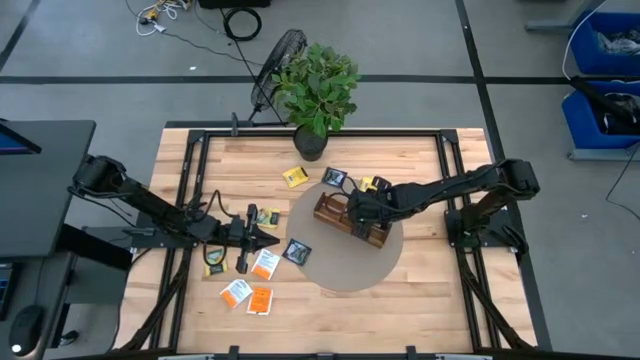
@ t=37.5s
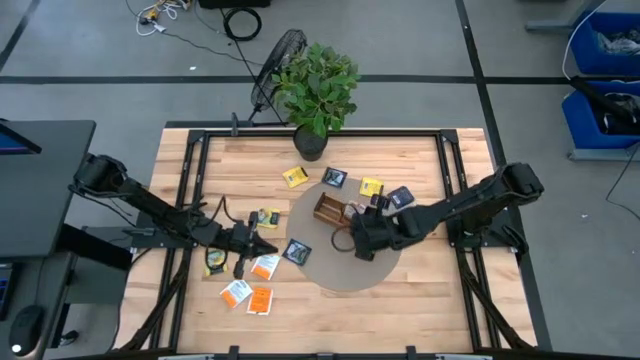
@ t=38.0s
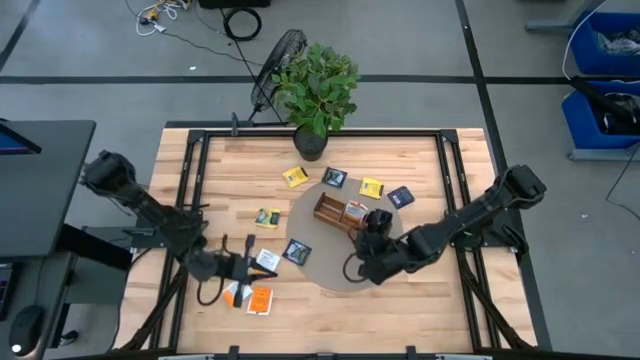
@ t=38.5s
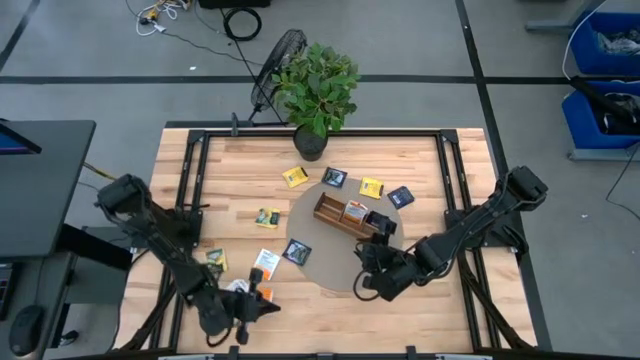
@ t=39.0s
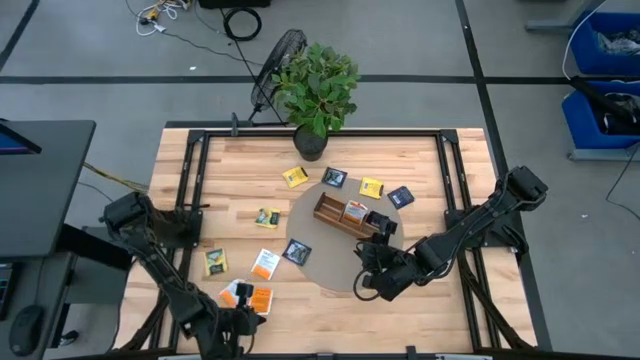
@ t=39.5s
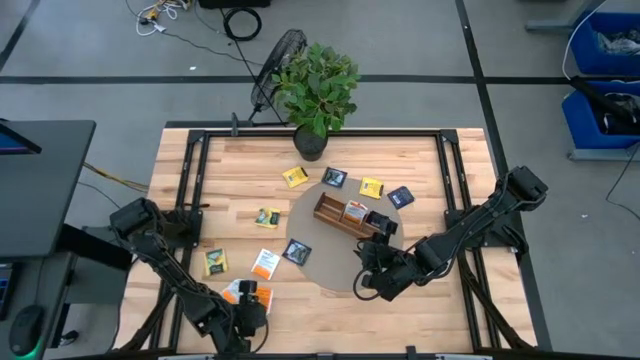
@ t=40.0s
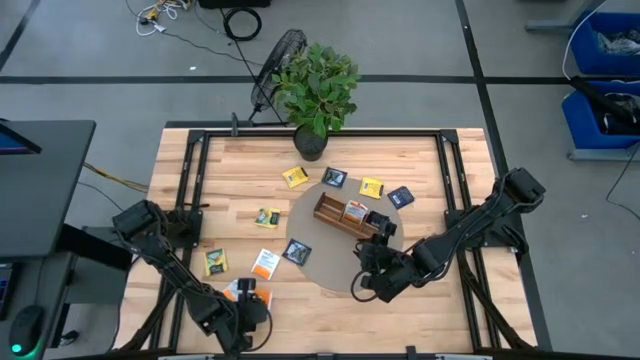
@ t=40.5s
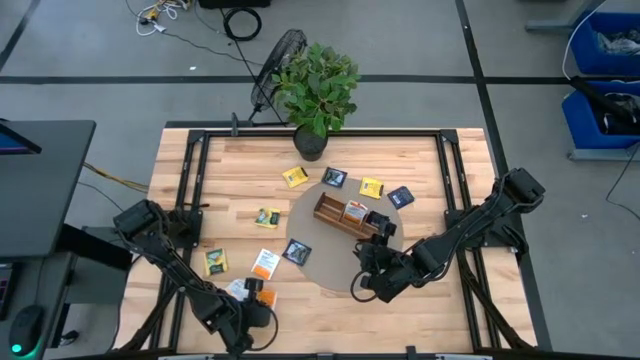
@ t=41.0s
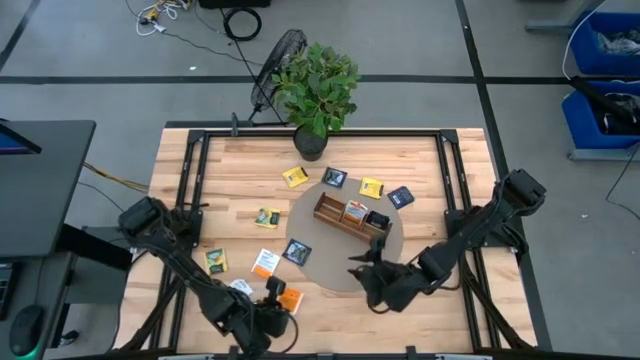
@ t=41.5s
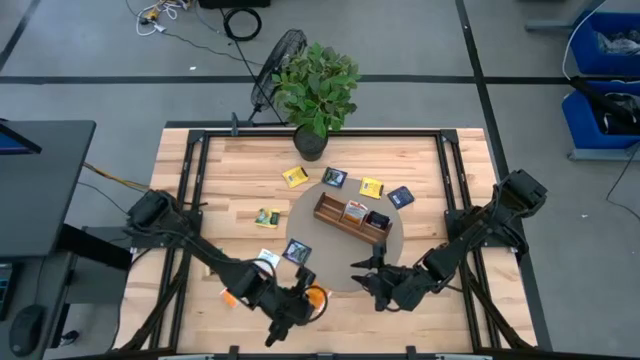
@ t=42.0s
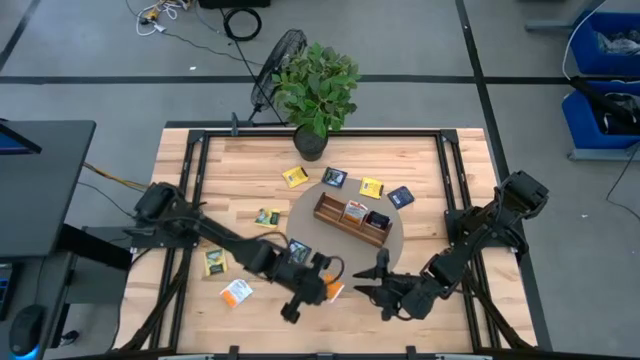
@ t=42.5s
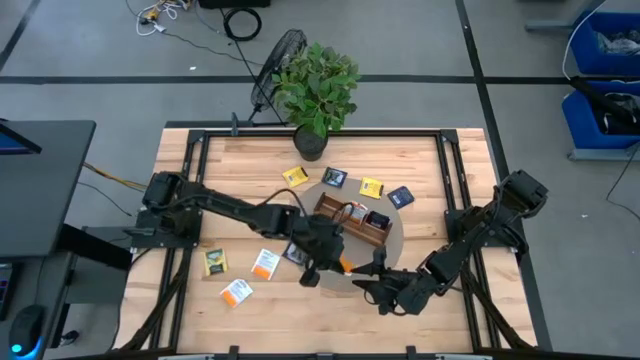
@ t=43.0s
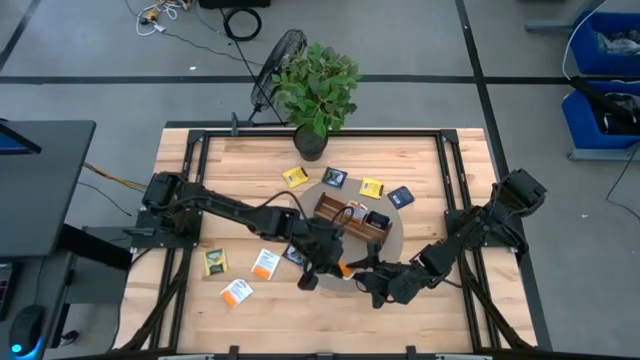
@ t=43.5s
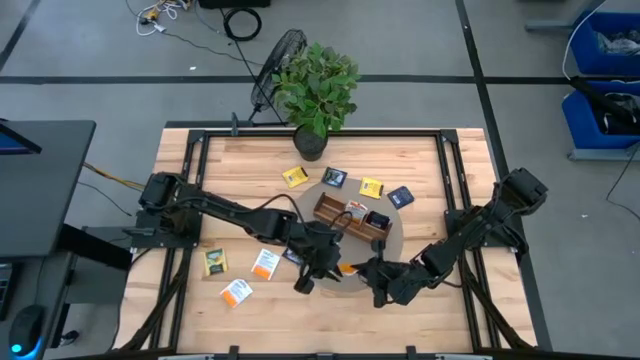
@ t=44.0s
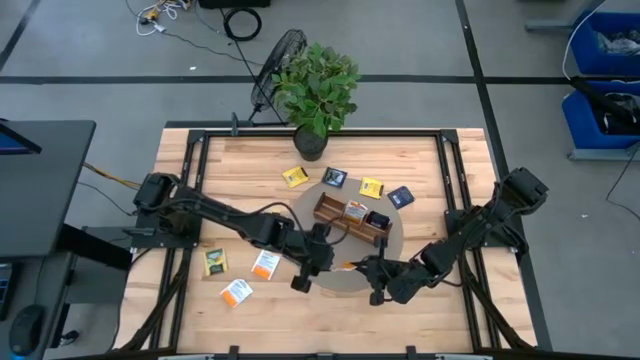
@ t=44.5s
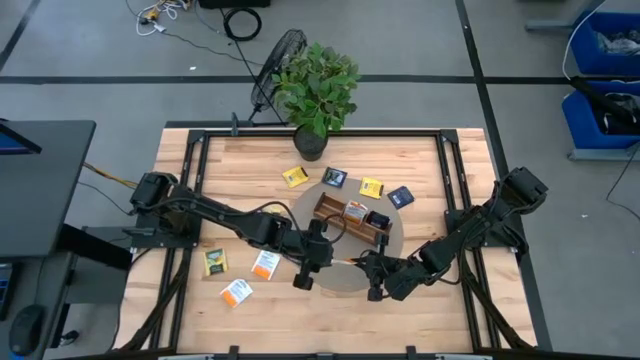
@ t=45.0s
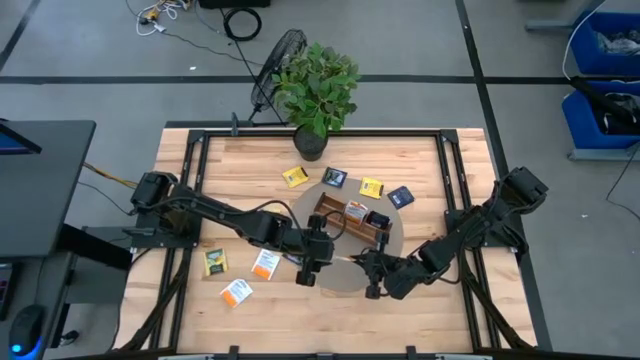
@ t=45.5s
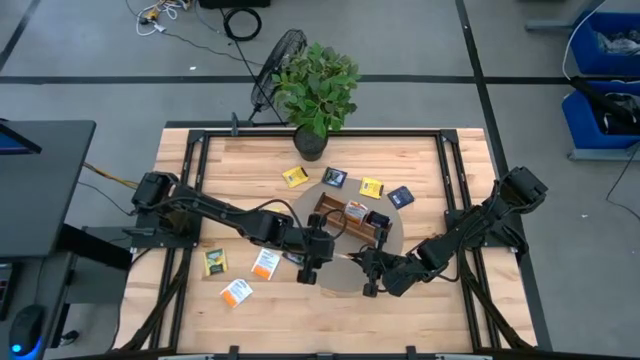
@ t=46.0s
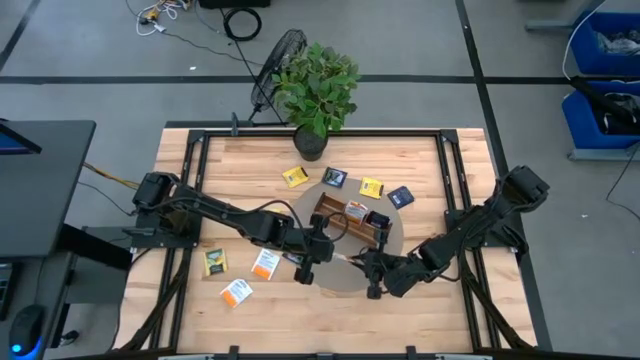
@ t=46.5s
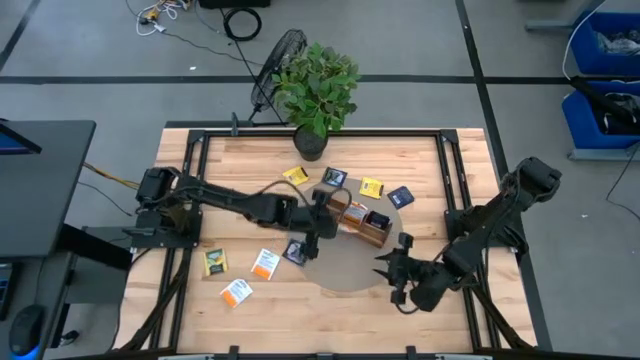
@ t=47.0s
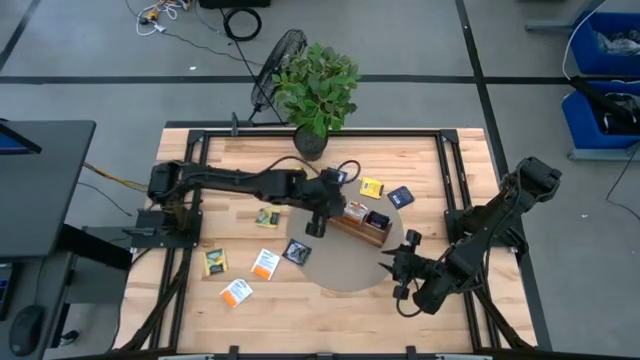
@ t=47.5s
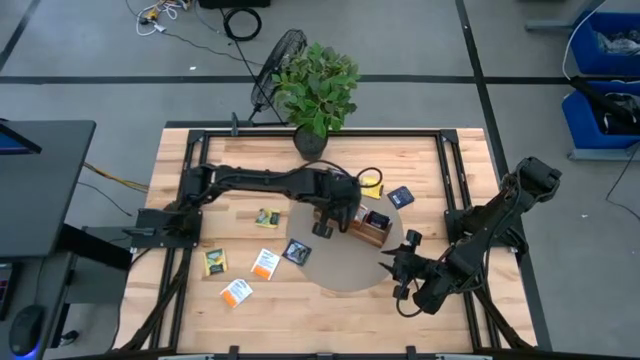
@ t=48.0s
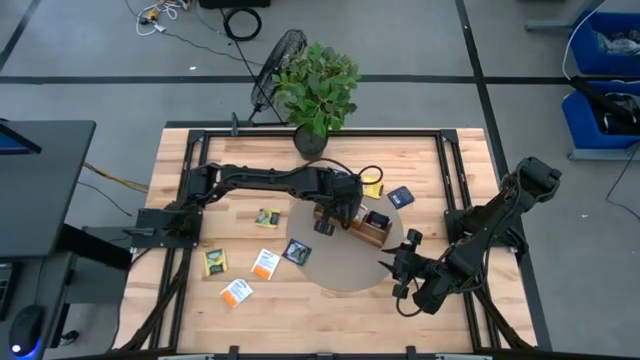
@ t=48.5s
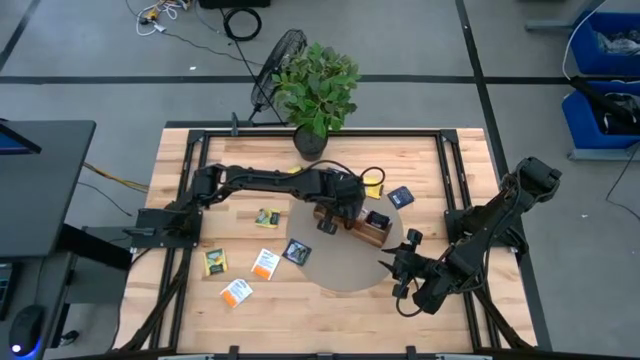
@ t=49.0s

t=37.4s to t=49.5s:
Task: Pick & Place Tea
Put the orange tea bag into the middle section of the wooden organizer

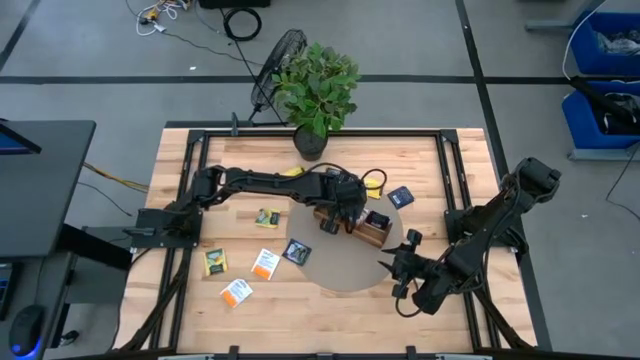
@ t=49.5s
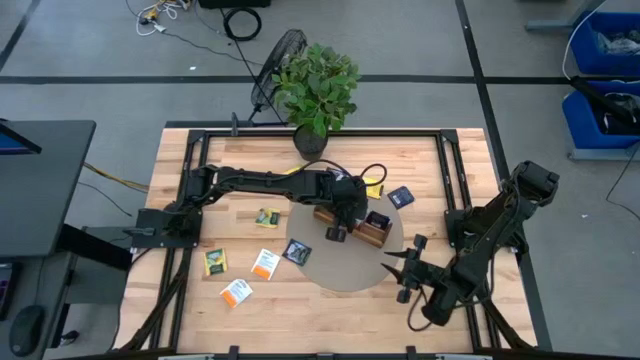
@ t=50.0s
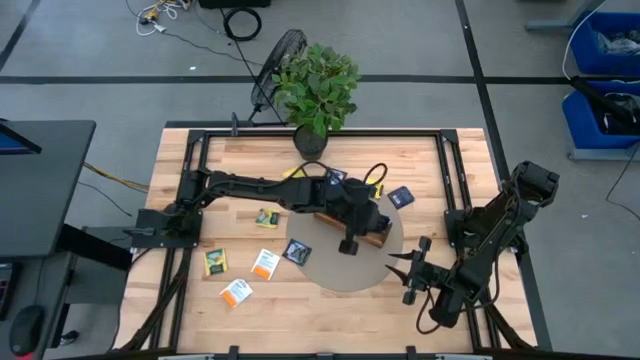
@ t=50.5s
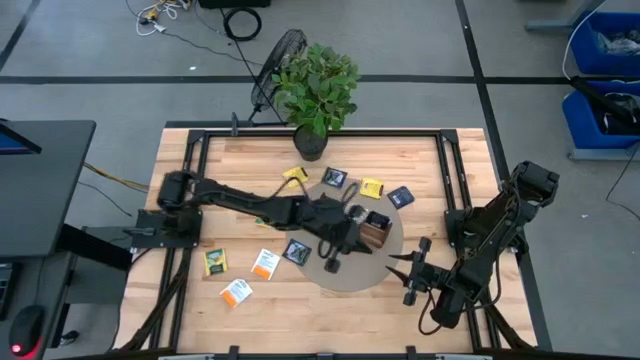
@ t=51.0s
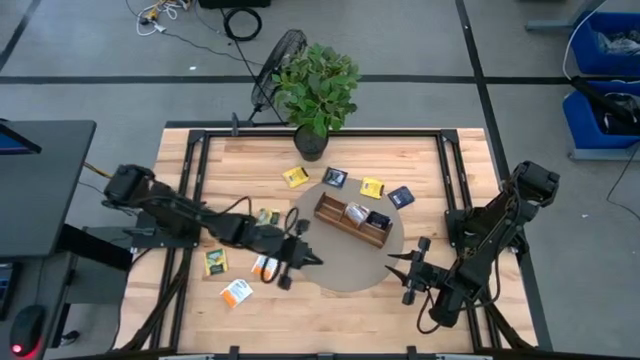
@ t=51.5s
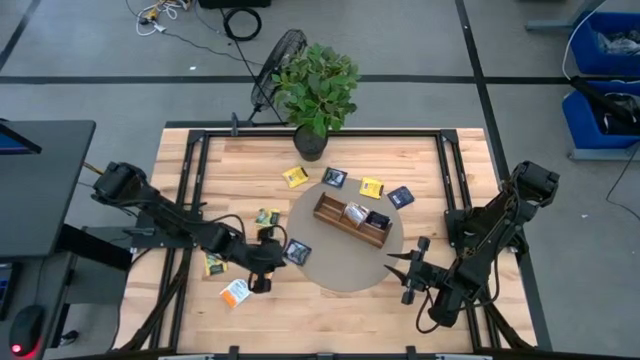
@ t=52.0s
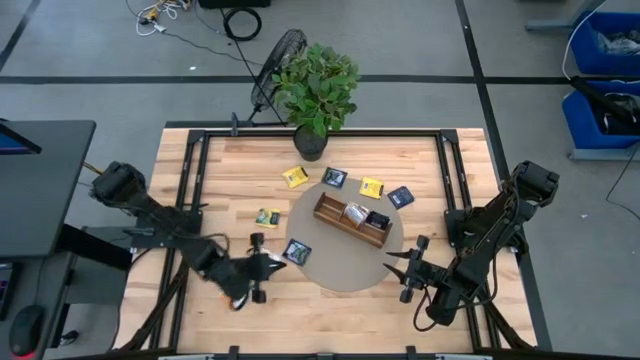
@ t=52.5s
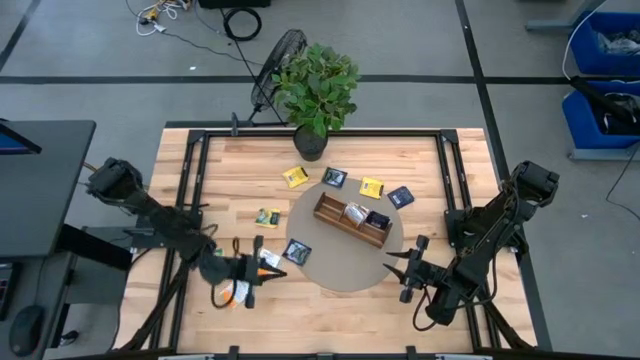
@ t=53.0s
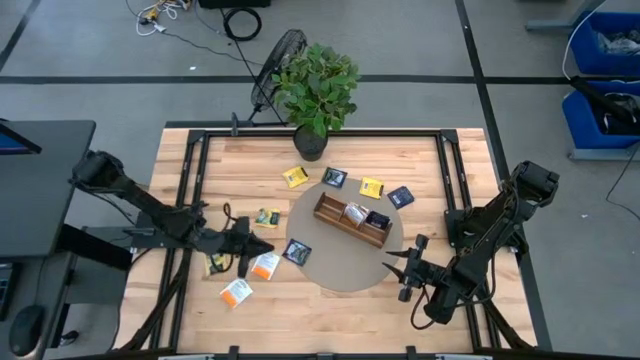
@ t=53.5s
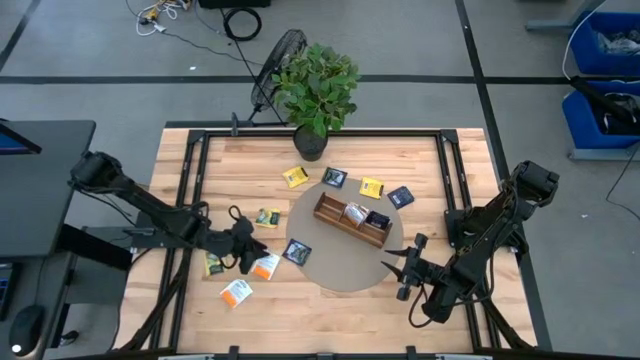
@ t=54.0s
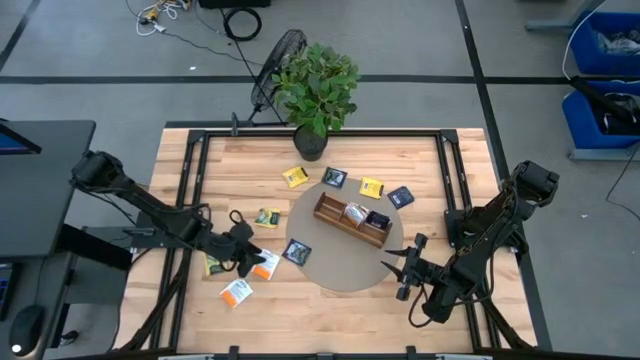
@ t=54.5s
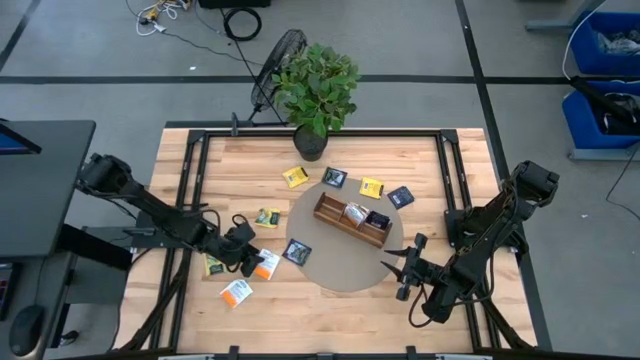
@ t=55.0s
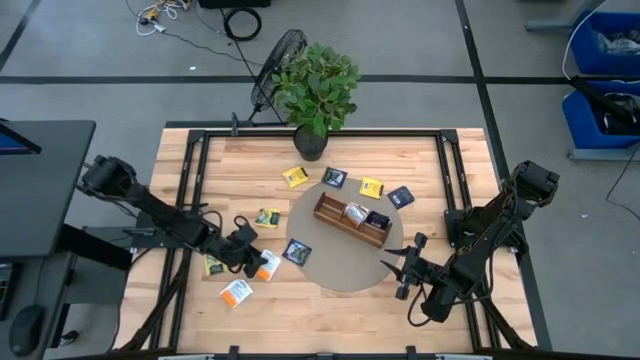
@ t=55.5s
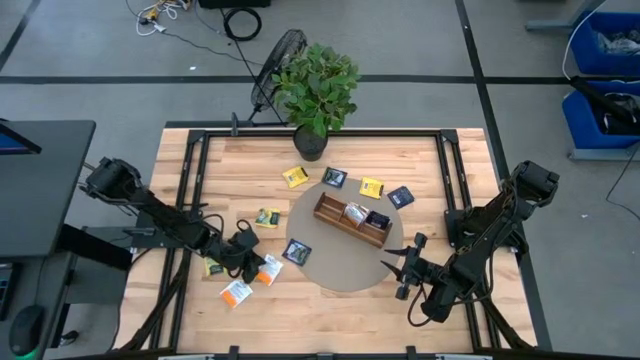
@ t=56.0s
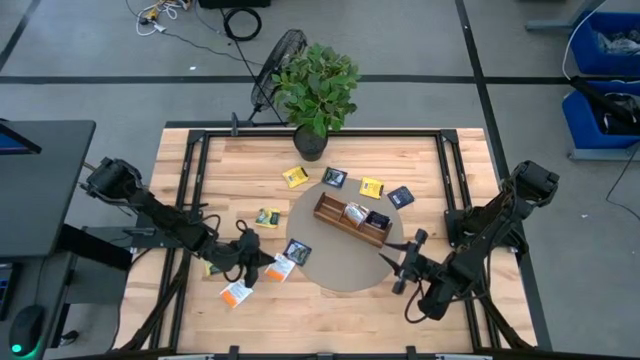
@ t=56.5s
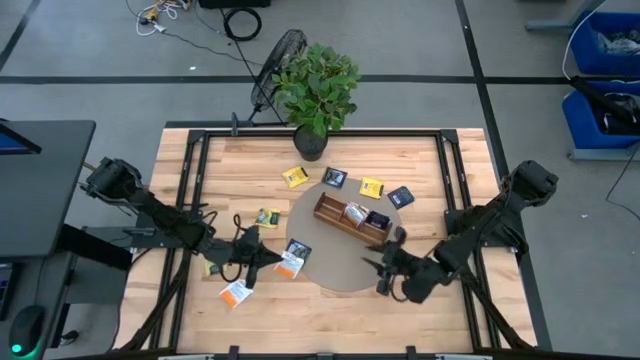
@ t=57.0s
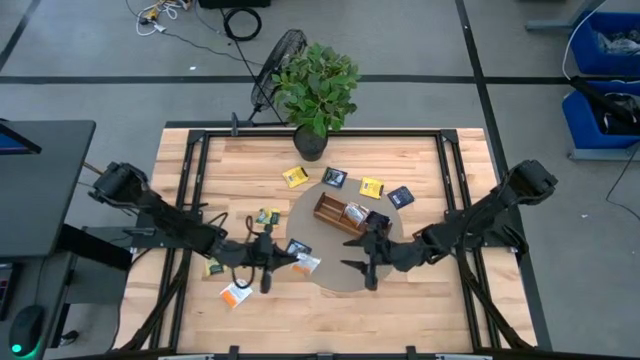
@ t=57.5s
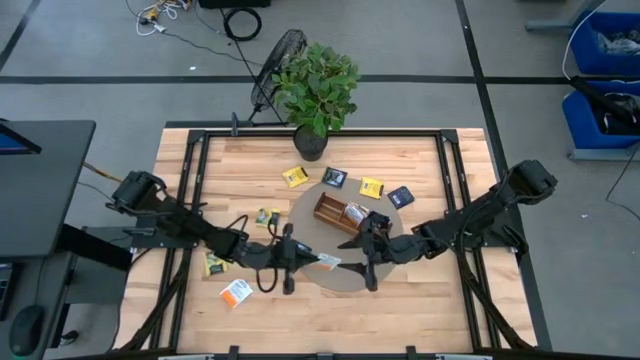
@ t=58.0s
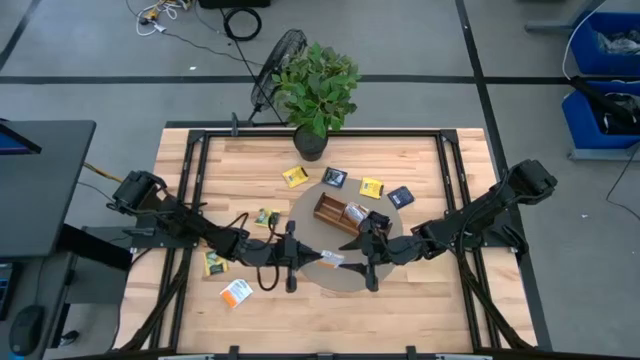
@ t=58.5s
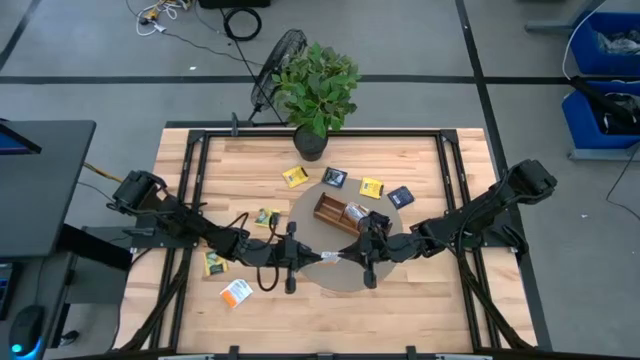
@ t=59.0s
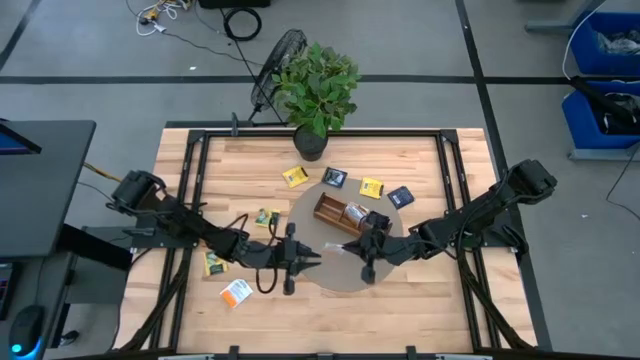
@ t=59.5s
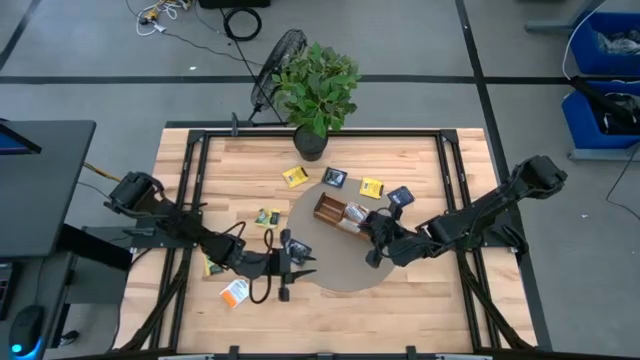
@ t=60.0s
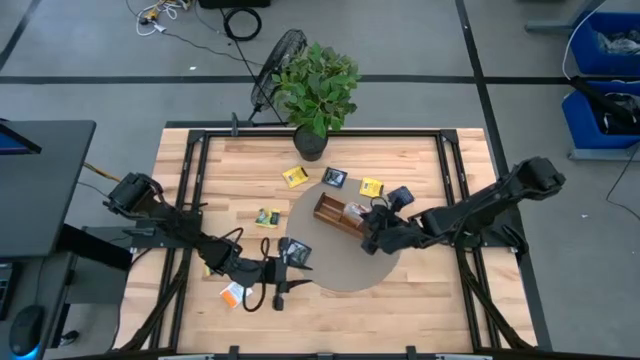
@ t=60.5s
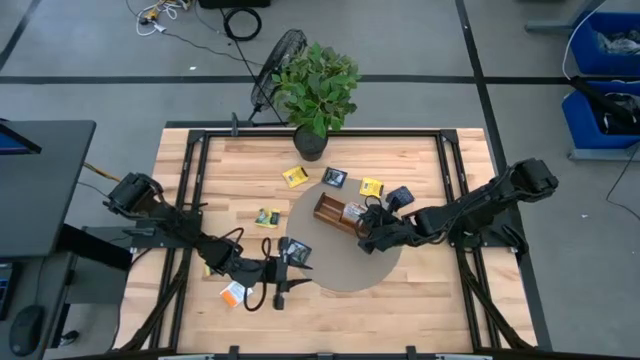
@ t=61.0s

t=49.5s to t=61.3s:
Put the orange tea bag into the middle section of the wooden organizer
